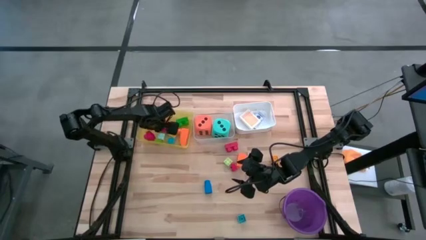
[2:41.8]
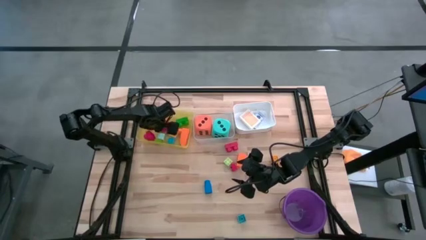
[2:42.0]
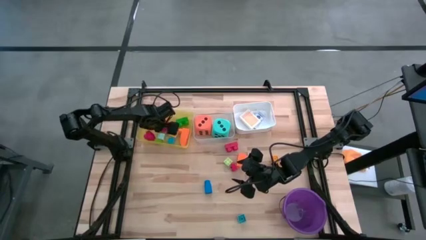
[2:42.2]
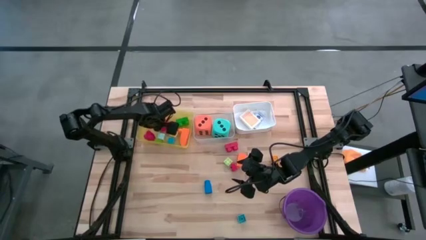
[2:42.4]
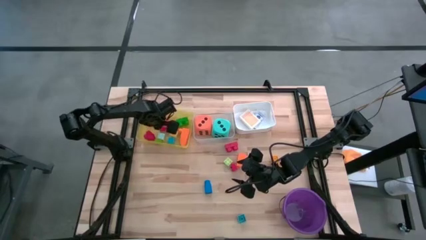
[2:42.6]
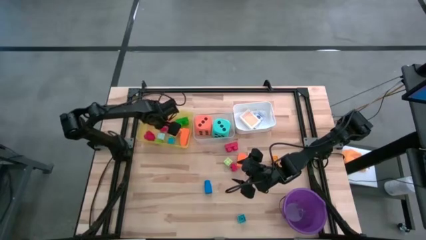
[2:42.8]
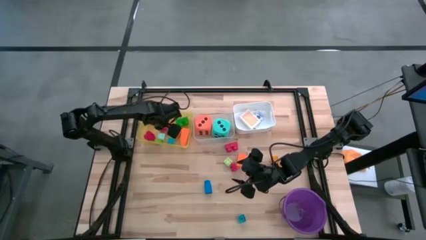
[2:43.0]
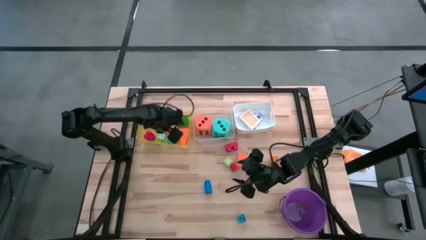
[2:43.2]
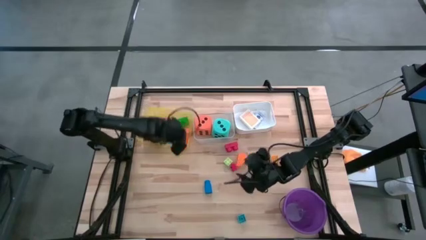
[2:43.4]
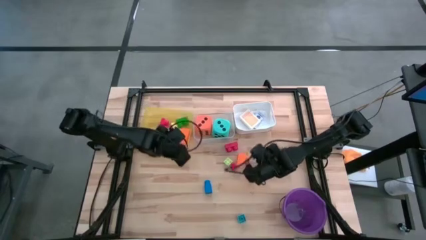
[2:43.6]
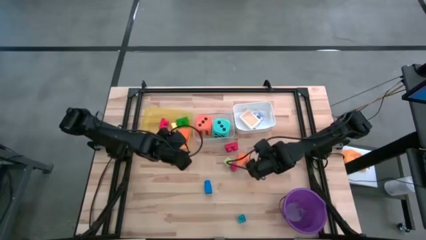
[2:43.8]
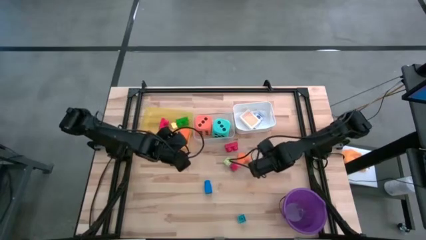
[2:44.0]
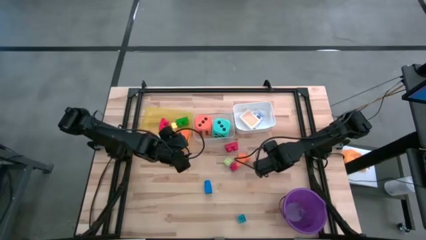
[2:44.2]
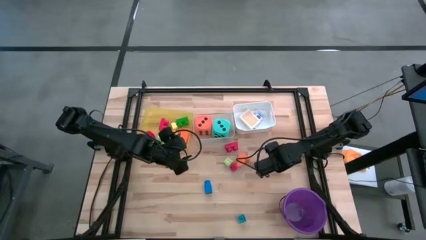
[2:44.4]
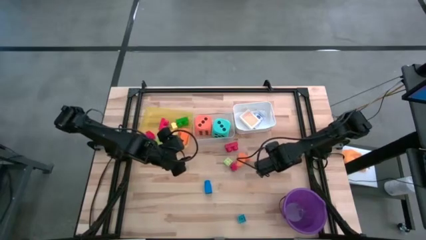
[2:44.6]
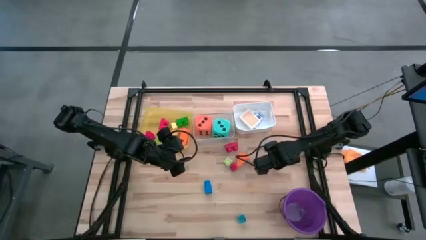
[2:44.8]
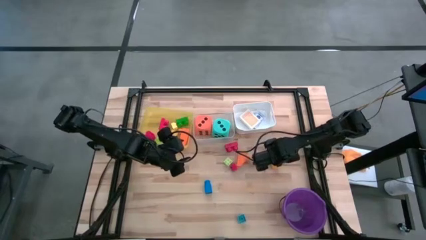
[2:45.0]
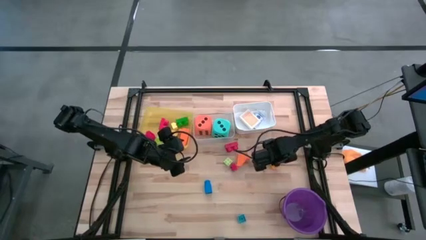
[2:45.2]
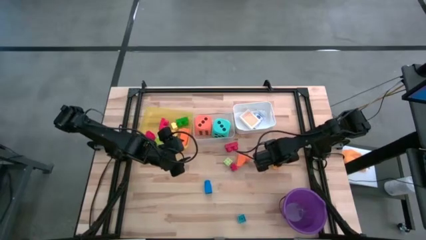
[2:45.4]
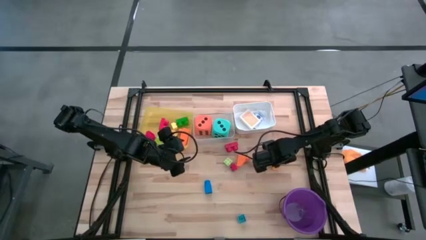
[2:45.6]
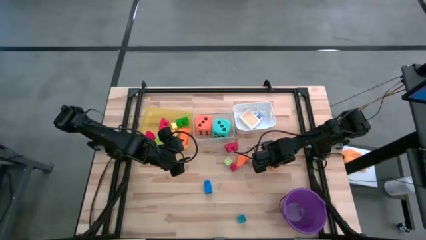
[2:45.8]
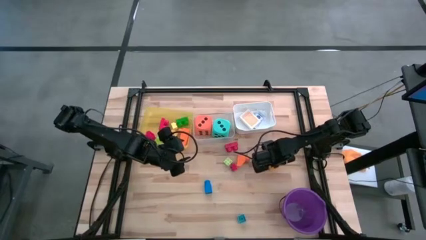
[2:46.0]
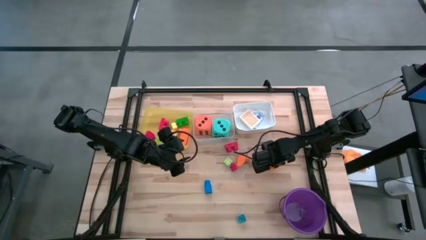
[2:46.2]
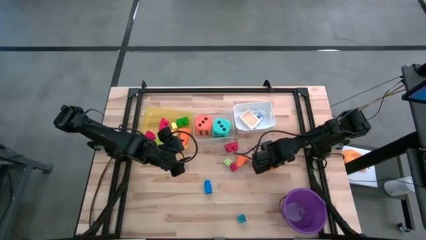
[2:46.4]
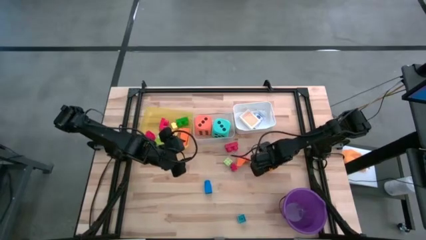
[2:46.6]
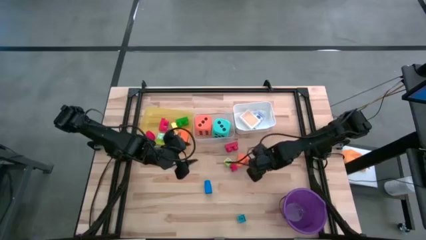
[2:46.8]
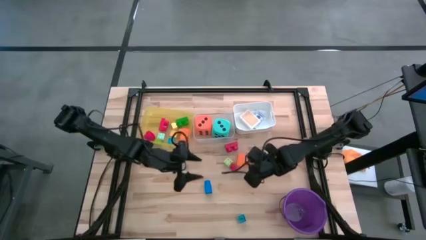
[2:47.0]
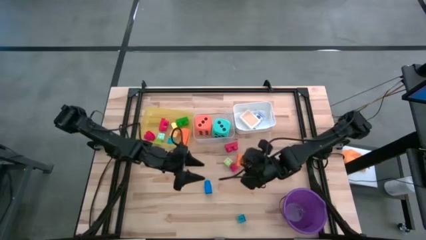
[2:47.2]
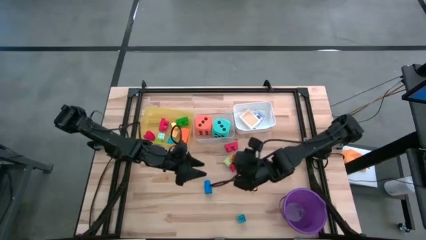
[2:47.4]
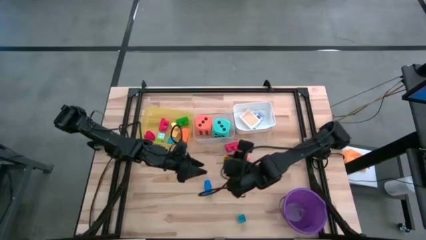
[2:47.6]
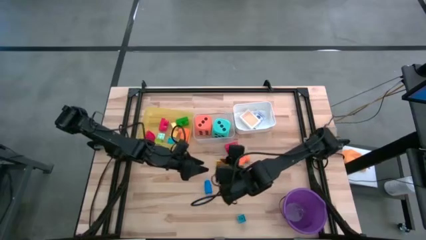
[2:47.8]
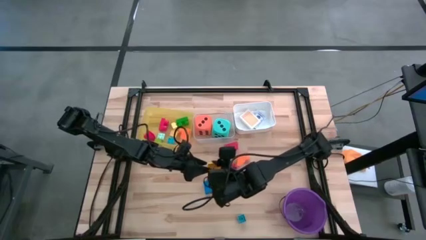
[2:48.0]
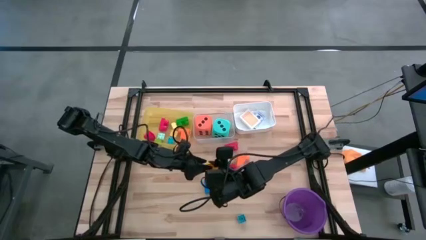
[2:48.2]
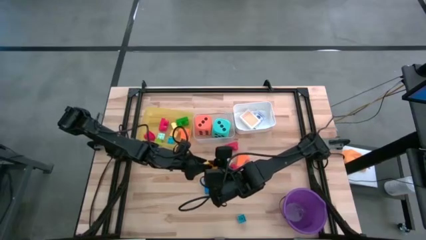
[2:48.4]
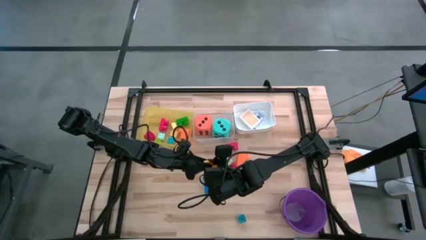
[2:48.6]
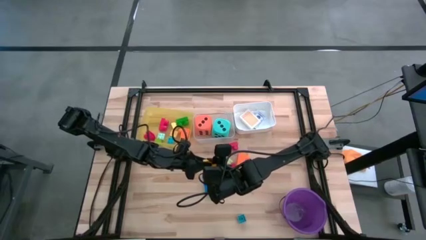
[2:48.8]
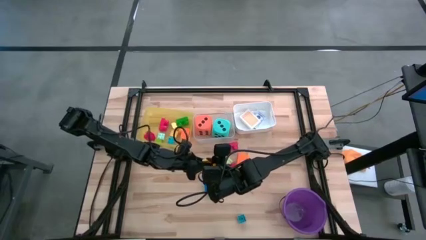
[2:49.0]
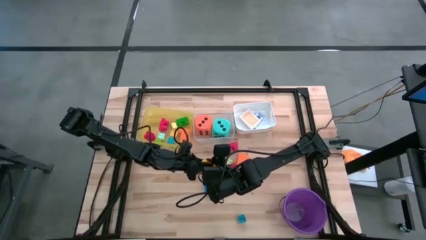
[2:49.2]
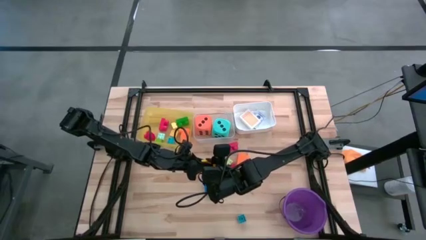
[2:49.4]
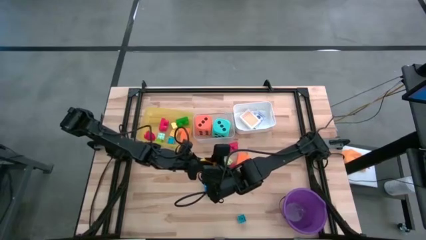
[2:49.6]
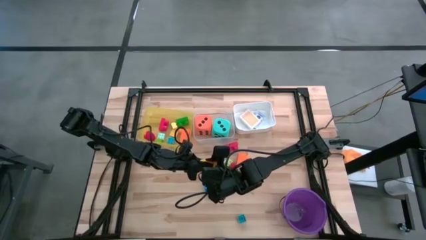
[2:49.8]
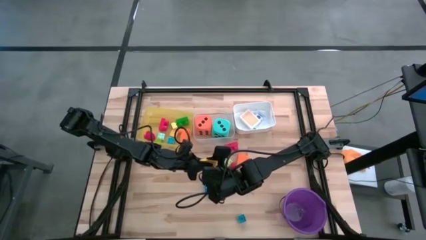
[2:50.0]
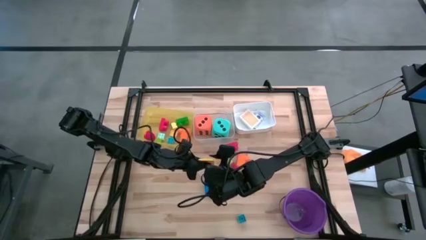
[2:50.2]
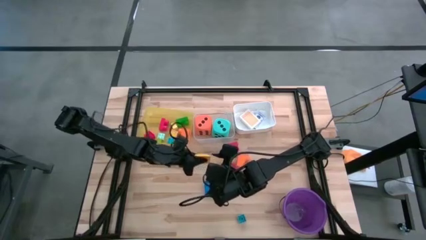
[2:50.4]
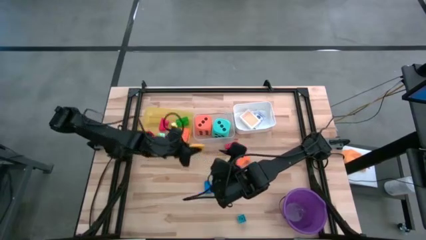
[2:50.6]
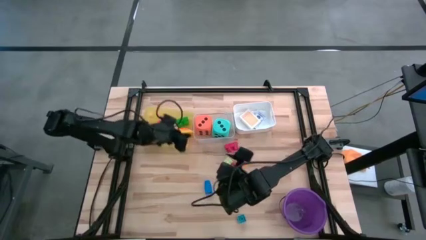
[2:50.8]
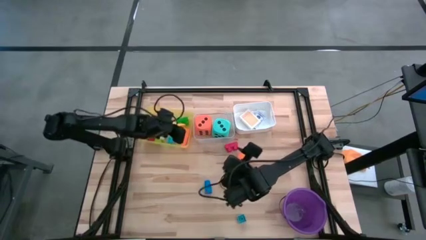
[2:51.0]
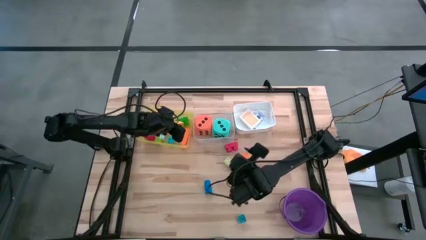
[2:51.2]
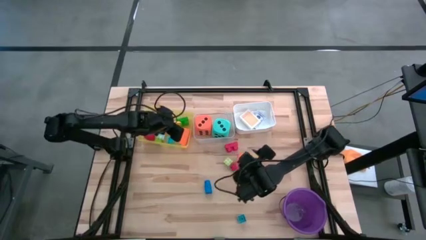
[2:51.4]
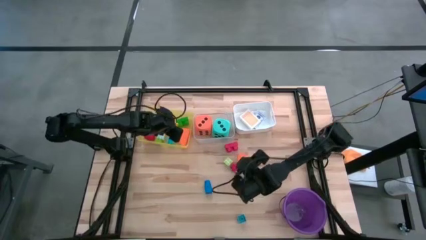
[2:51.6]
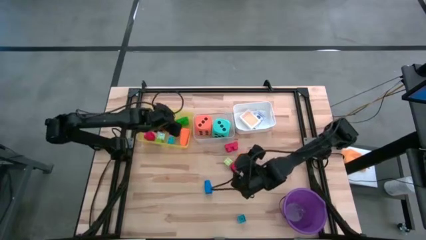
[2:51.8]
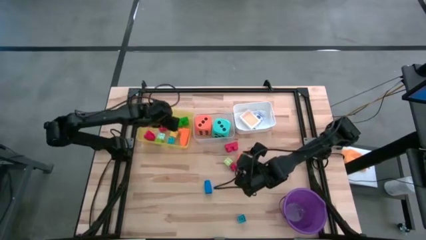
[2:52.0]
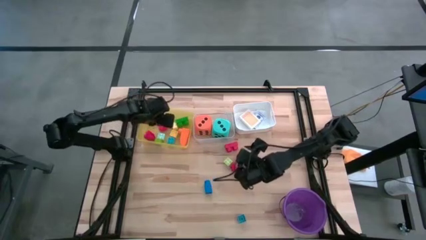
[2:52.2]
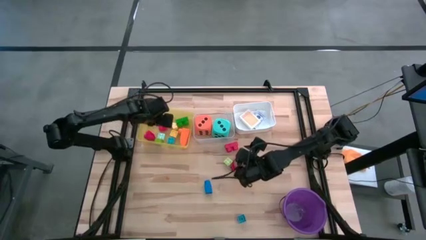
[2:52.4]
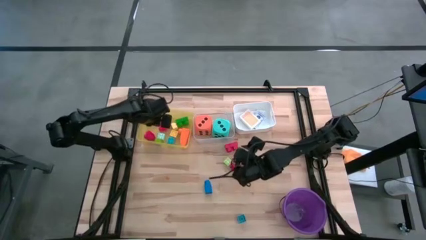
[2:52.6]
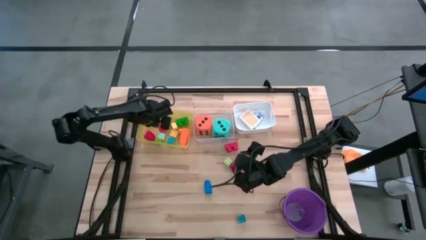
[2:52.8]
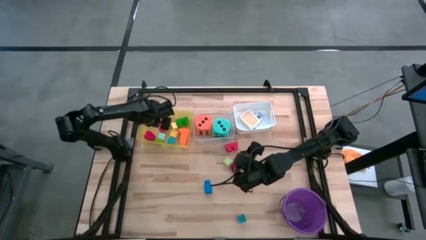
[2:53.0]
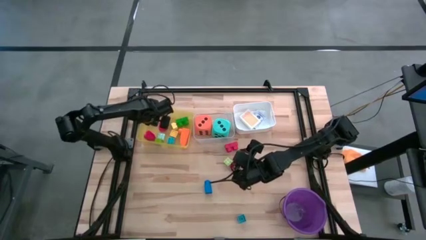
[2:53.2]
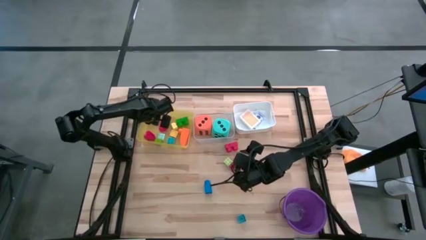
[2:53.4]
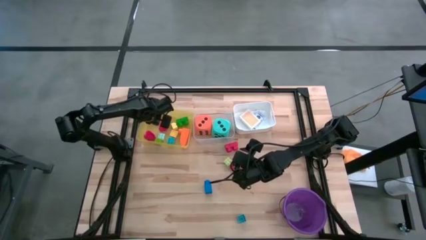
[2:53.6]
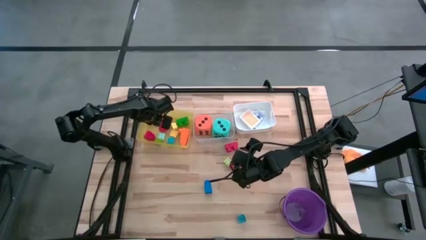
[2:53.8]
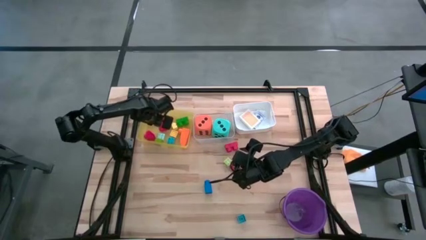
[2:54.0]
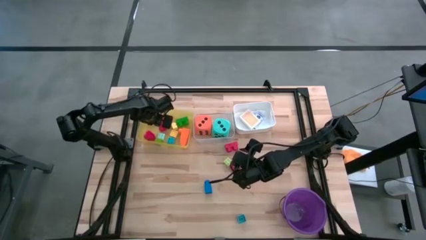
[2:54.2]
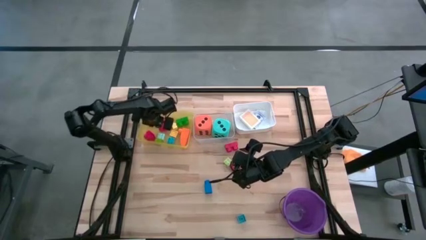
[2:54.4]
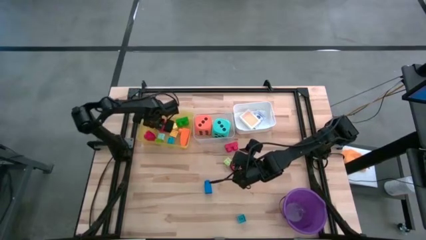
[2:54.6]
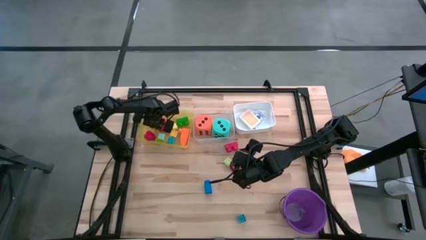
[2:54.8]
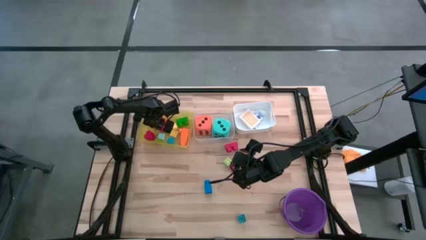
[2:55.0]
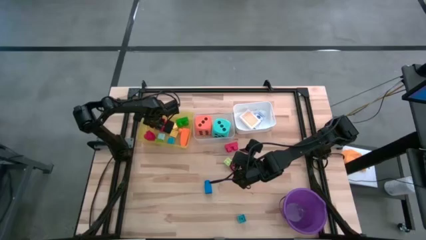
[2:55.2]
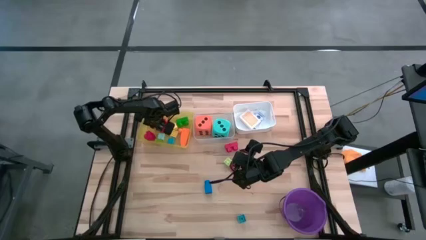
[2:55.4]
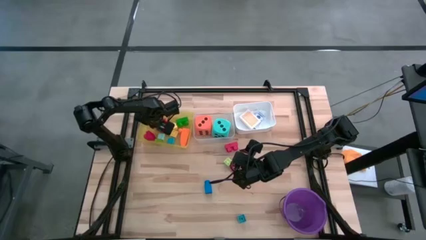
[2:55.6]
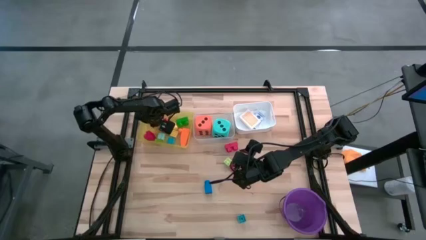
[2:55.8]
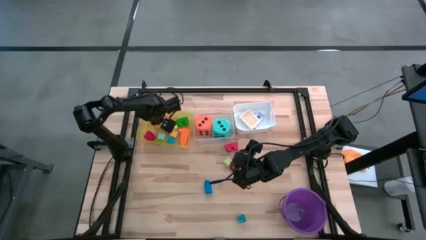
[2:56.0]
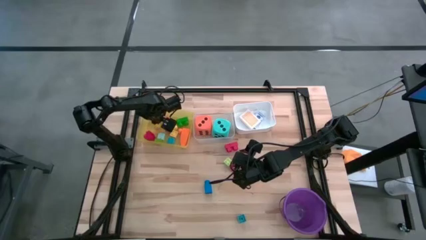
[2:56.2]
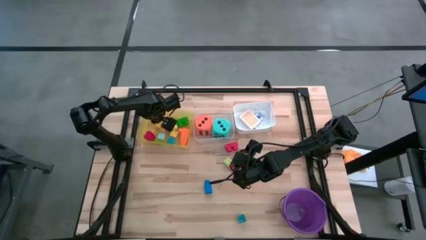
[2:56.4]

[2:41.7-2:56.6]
Task: Pick & Place Toys
Put the yellow game piece into the yellow bin

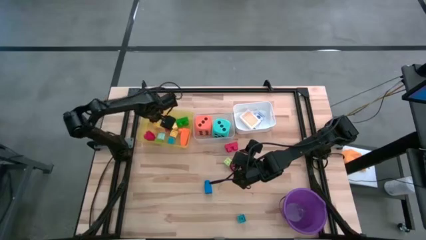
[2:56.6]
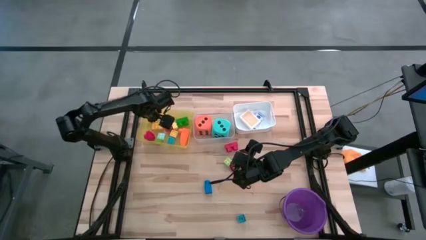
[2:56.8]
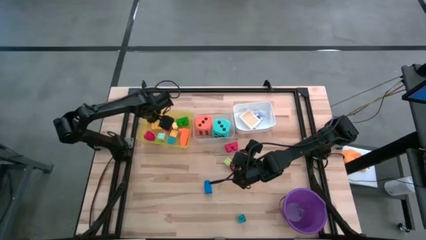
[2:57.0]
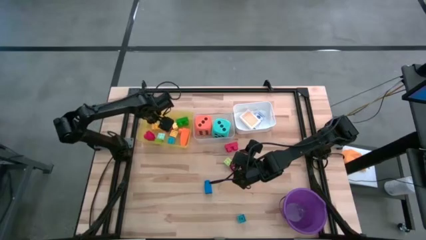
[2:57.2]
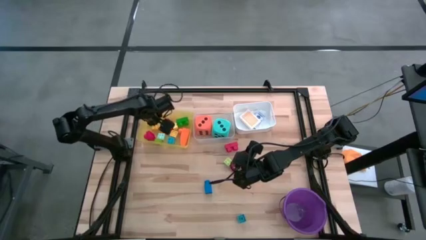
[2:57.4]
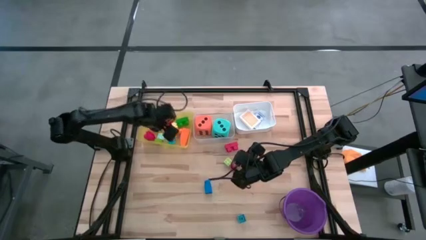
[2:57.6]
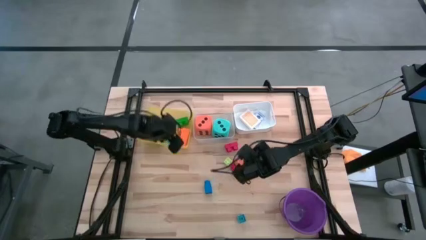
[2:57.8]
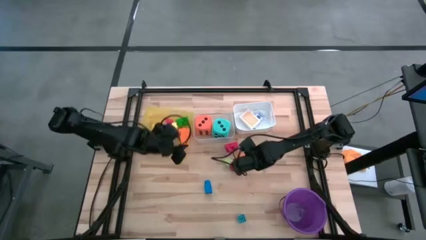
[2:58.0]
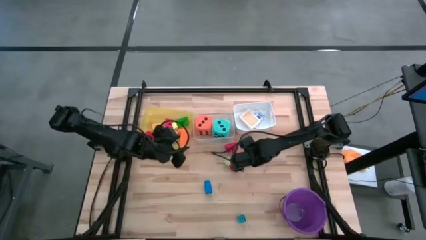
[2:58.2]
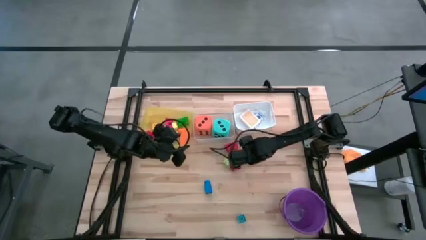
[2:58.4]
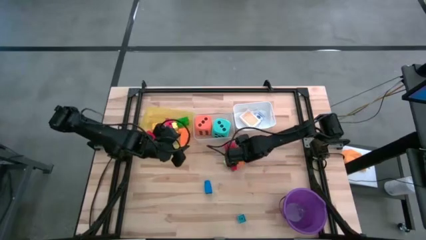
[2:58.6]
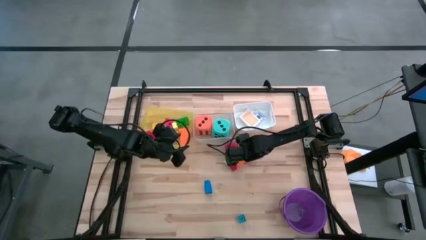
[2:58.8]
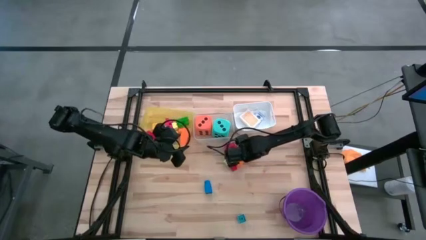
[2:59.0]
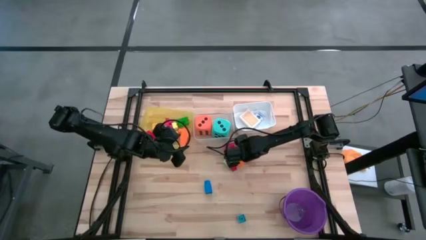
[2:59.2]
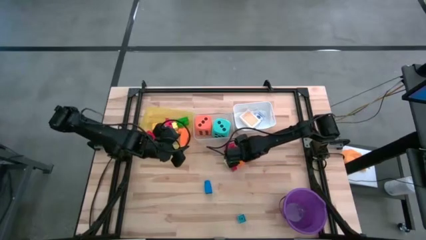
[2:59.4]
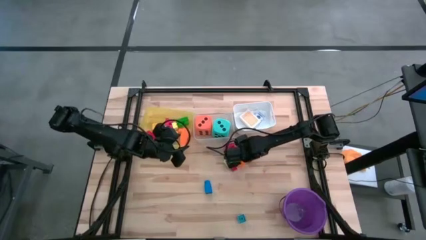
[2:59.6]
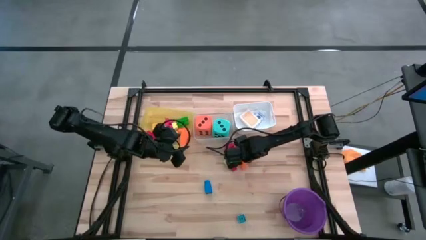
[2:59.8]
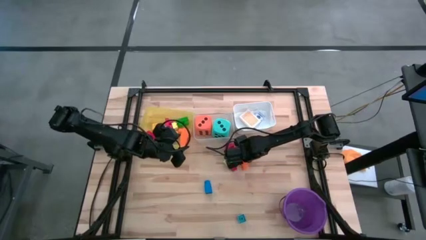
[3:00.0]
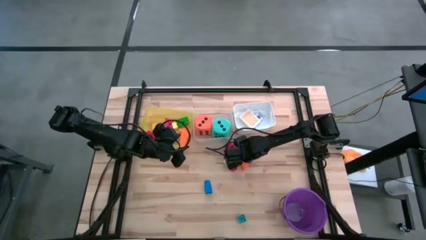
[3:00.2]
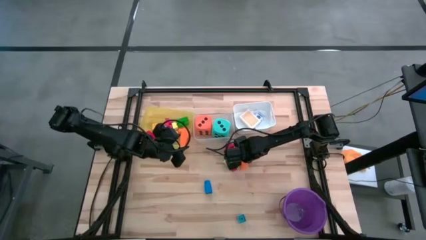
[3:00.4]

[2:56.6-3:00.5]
Put the orange game piece into the yellow bin
